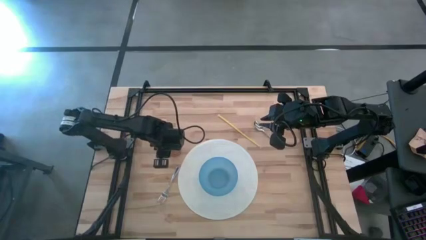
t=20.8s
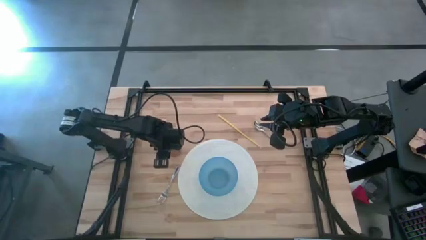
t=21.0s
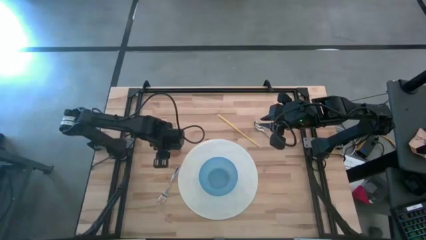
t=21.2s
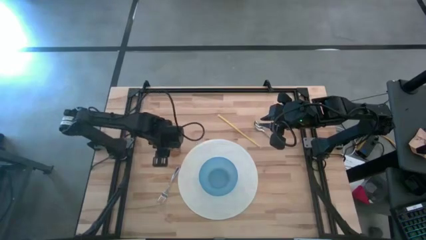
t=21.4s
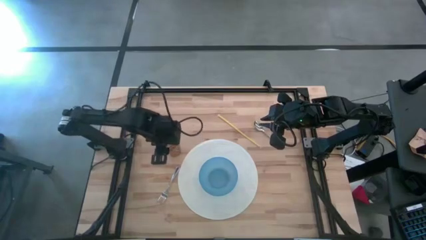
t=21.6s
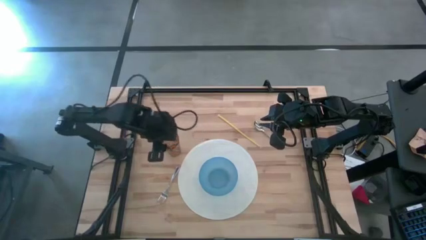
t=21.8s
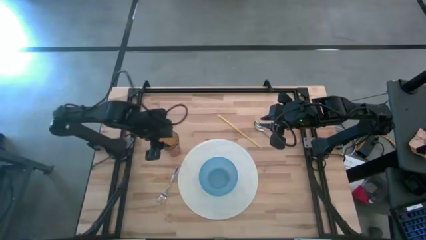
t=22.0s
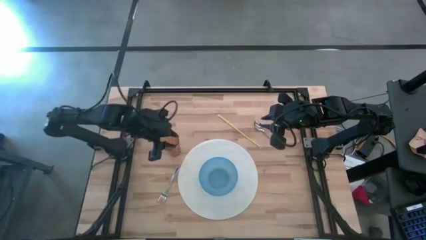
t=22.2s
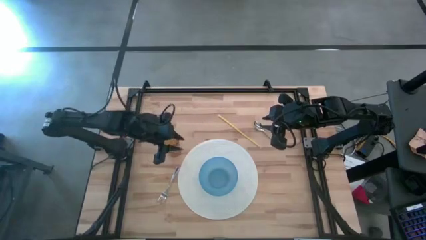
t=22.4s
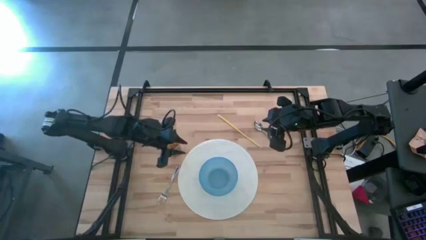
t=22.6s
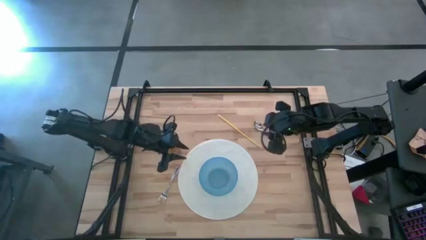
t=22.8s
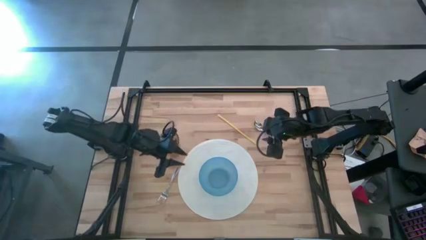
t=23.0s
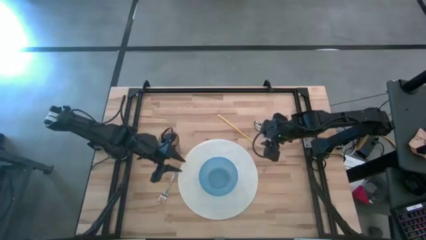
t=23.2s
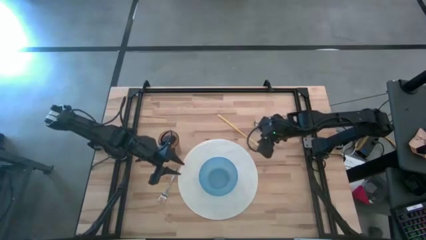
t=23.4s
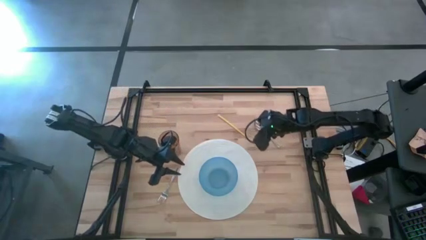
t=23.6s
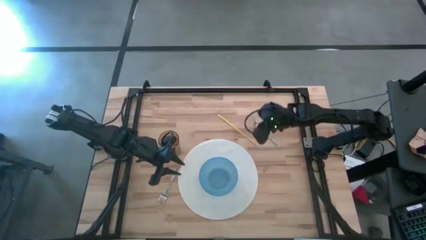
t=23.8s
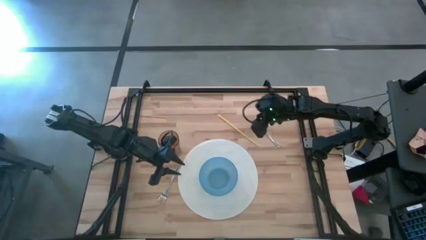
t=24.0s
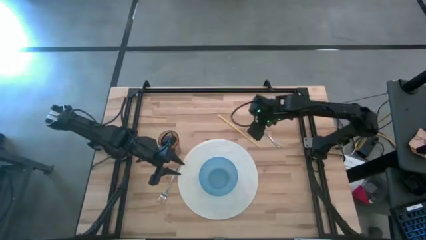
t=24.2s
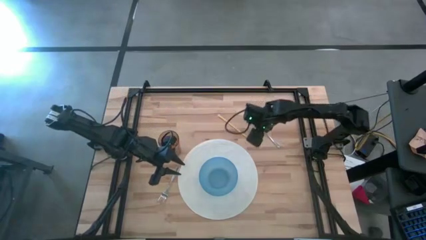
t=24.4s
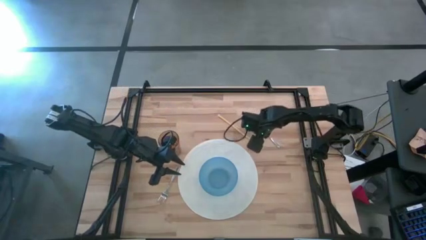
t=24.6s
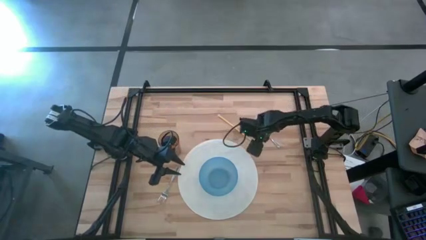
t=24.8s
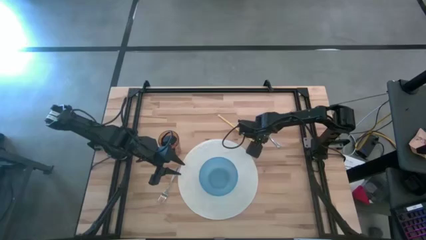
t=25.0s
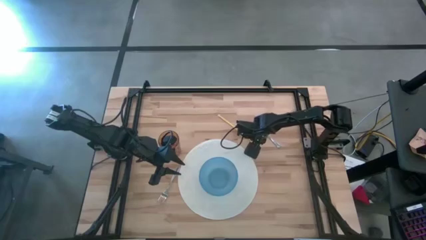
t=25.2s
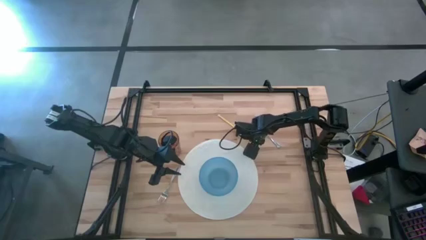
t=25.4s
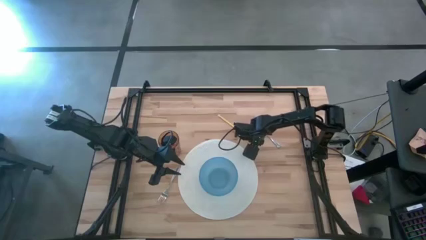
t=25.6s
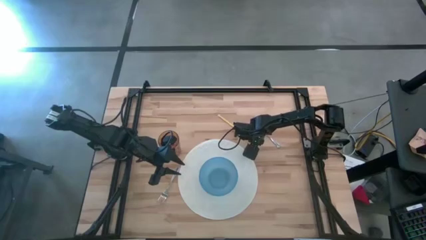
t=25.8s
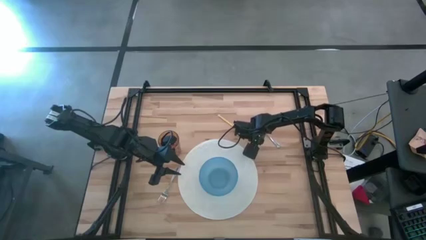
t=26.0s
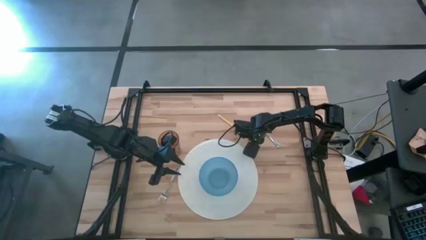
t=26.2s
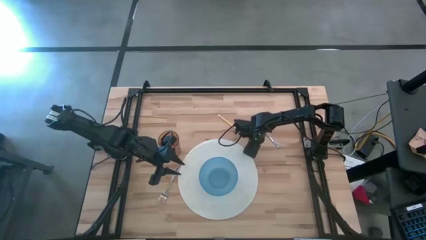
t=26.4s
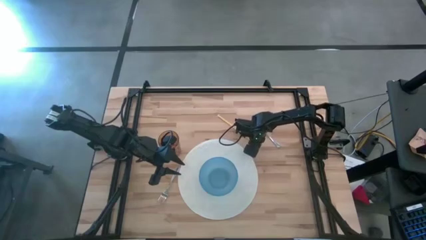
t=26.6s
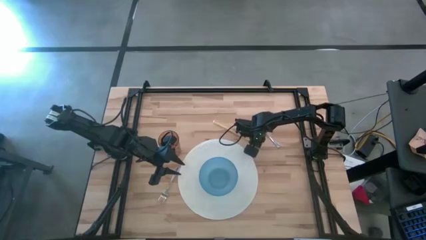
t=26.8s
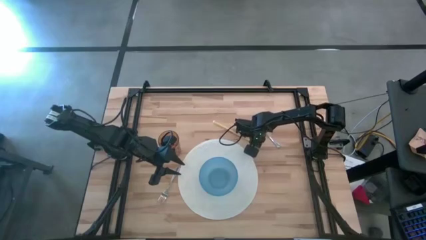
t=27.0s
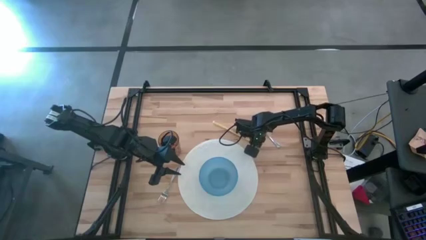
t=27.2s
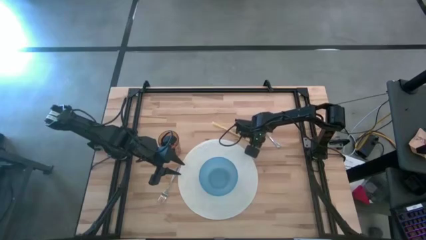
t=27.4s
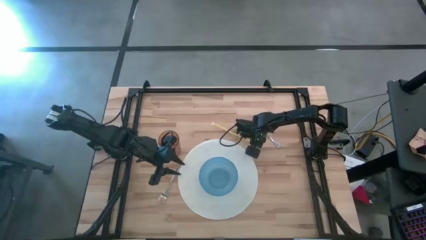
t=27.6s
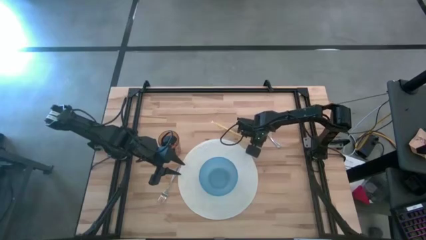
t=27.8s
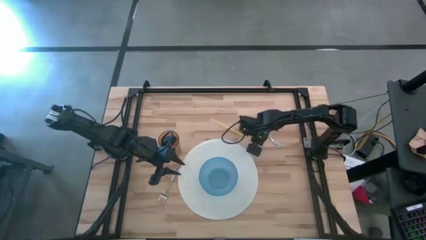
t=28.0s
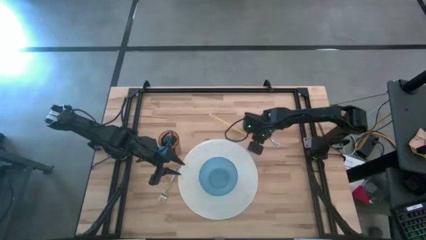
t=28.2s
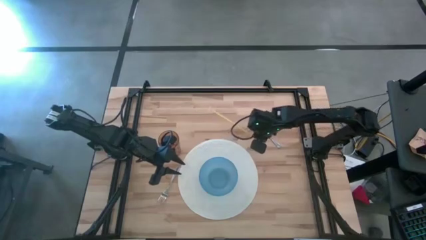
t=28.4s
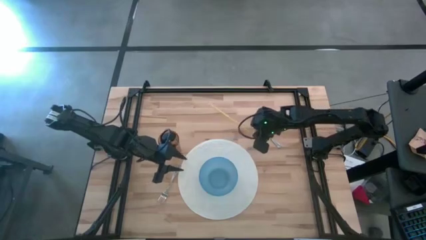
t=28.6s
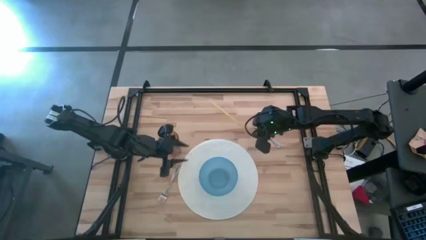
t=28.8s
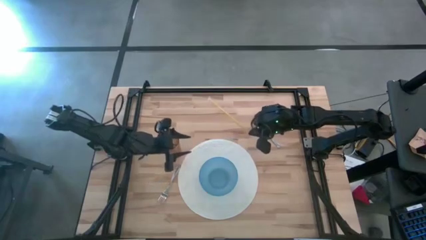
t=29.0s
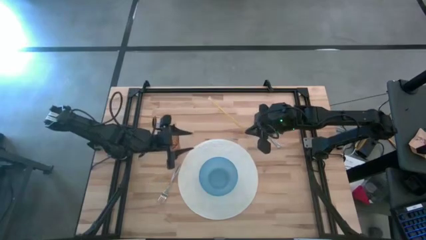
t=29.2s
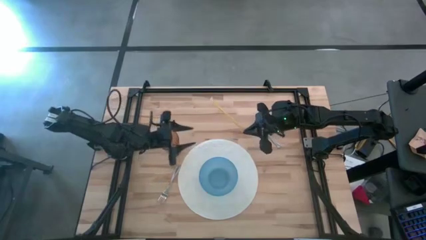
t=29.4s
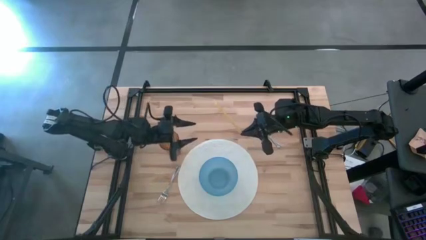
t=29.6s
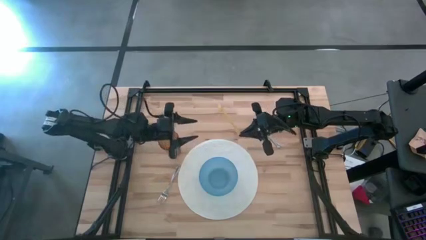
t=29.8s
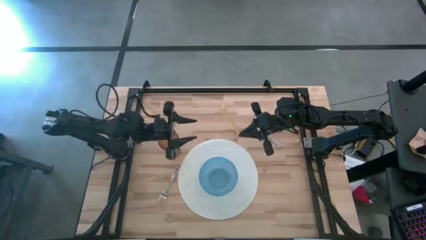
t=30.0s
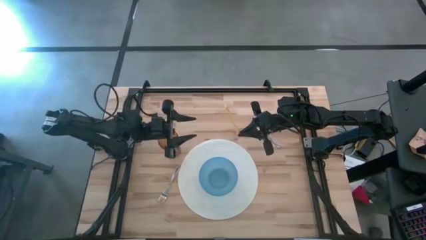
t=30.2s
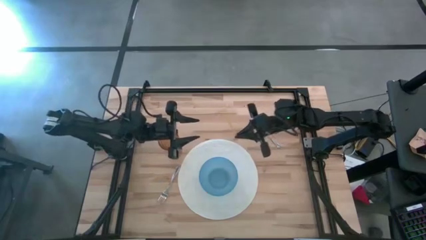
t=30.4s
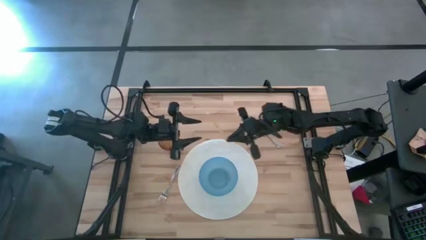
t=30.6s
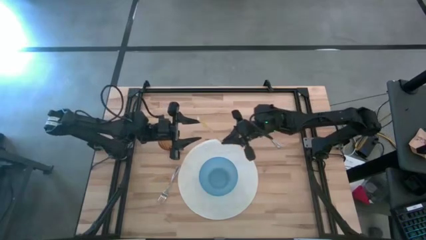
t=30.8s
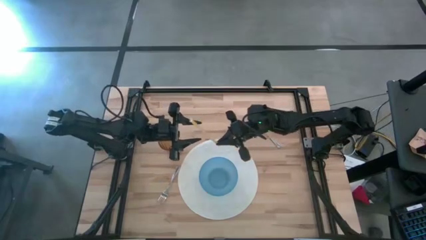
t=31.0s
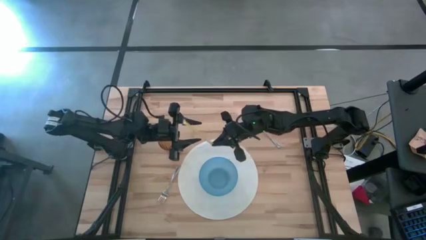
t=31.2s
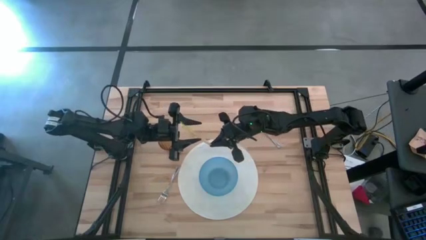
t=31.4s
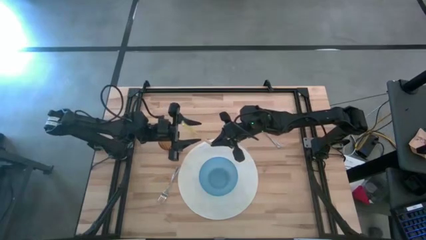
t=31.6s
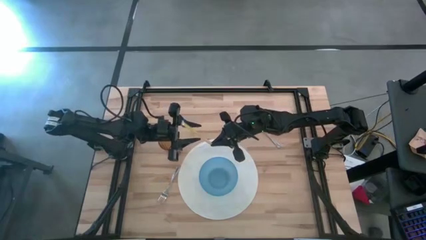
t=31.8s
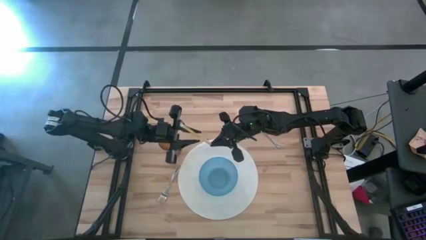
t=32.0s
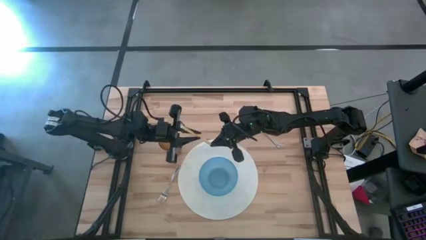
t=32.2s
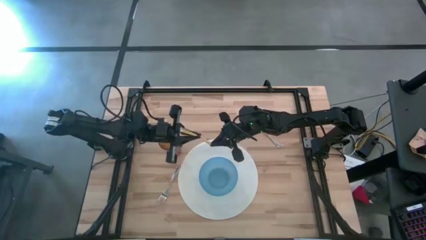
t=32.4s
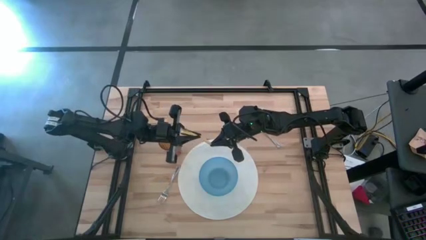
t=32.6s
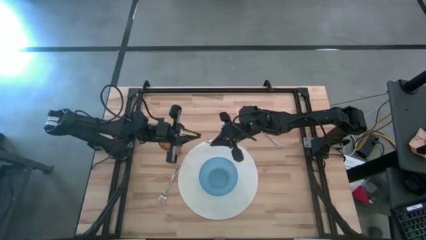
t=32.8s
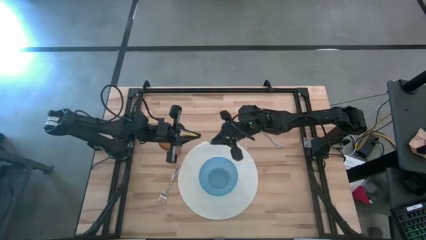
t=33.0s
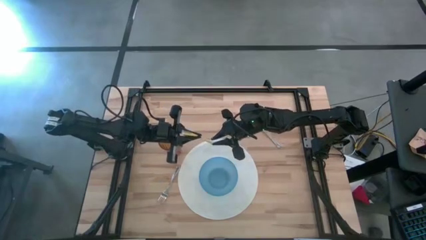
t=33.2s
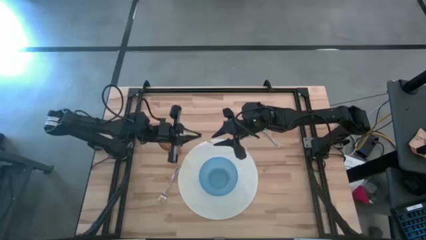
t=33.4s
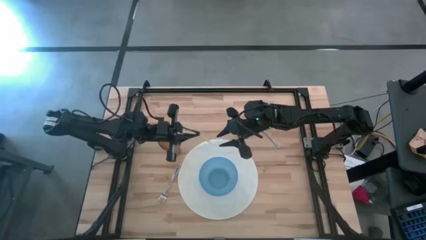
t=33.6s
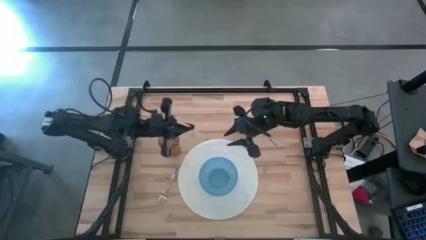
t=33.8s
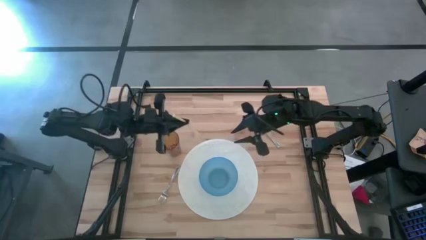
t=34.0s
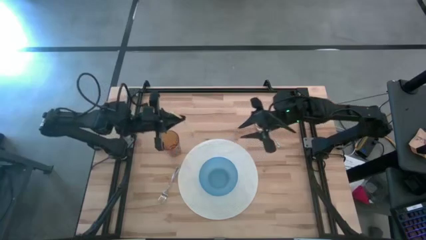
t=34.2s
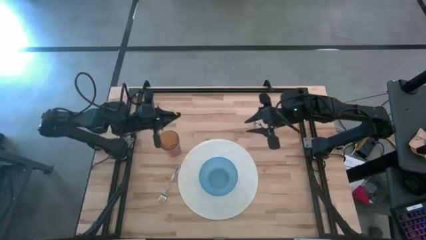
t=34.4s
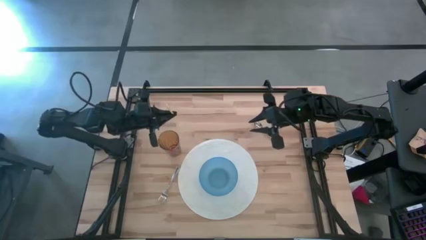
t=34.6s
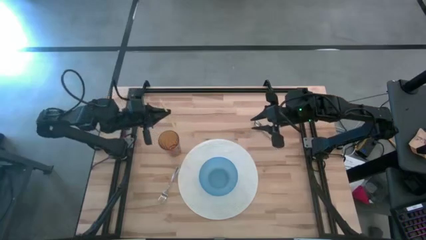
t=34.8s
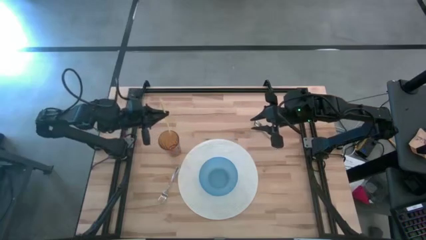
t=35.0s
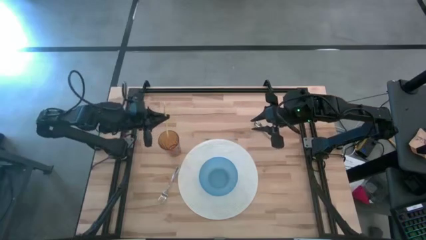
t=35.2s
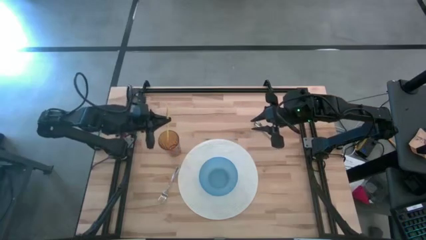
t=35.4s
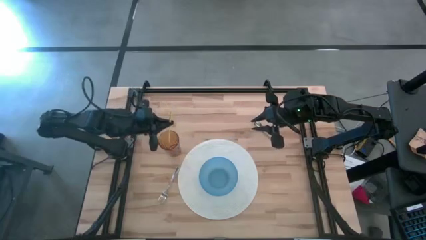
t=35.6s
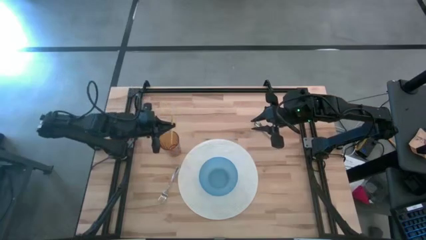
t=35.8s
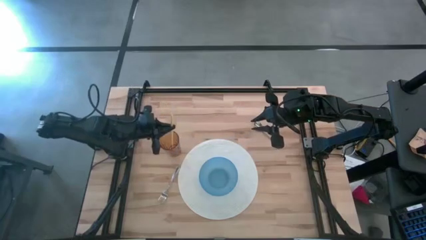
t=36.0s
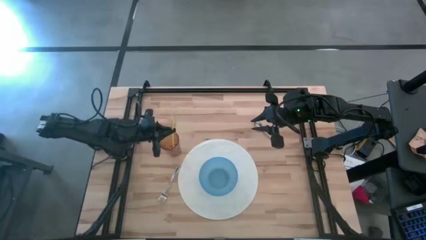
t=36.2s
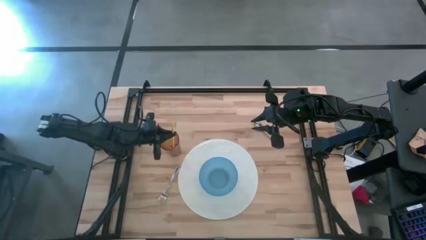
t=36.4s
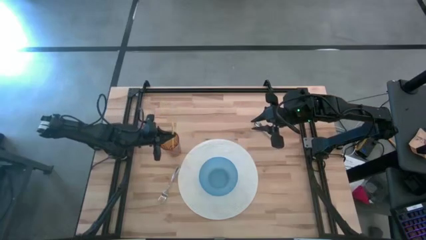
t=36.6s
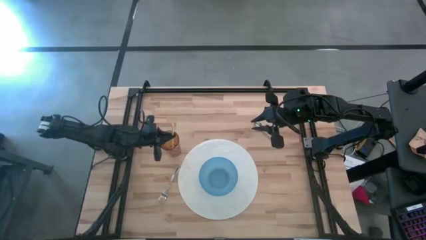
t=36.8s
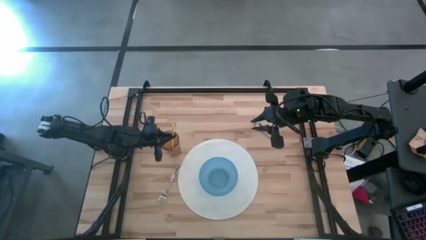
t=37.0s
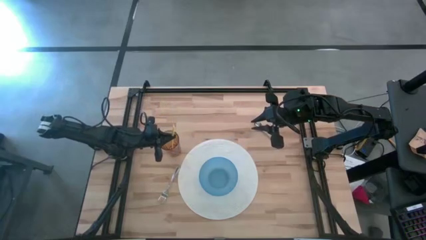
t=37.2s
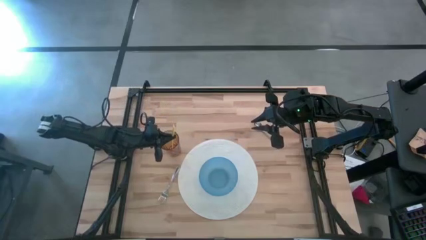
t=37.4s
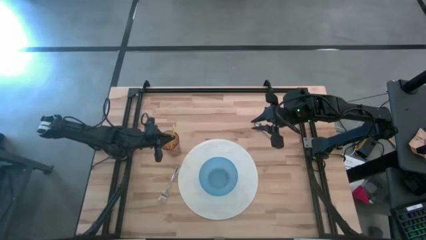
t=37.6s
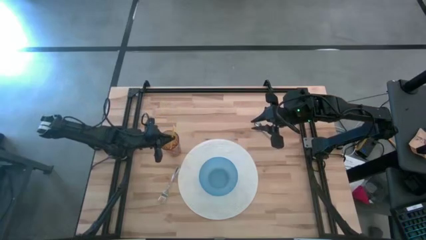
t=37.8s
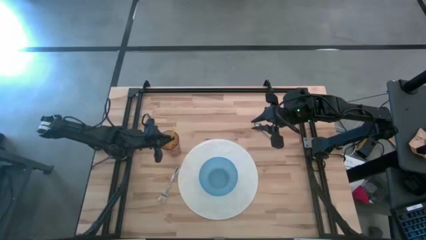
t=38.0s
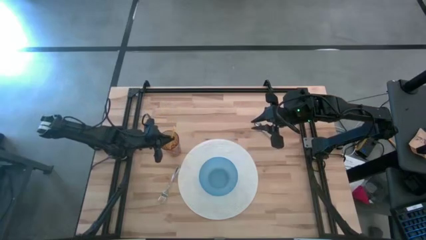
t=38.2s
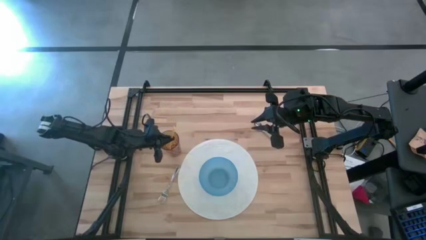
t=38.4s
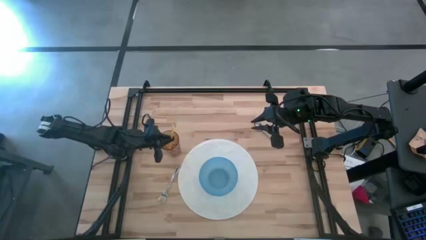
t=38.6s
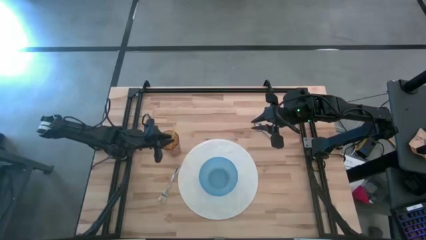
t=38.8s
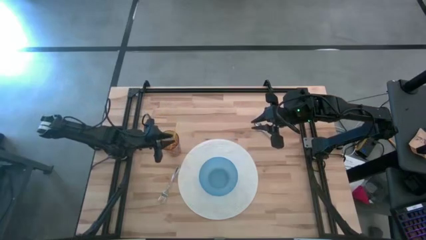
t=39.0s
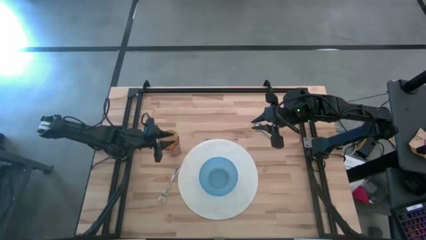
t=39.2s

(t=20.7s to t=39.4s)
Task: Pick & Place Utensil
Put the yellow straw into the cup
